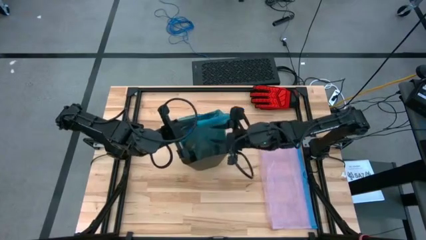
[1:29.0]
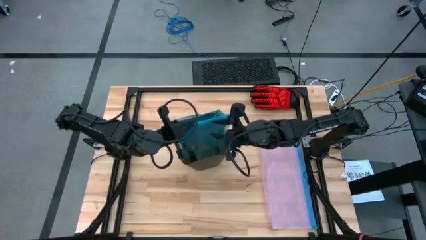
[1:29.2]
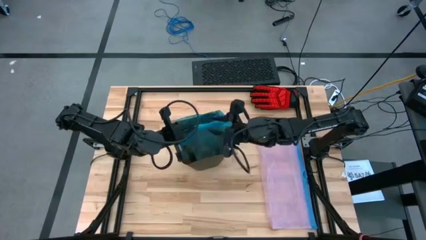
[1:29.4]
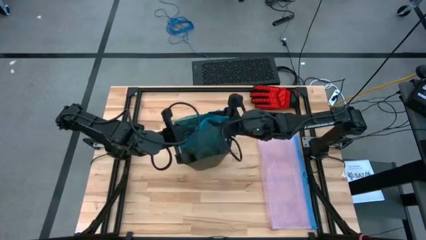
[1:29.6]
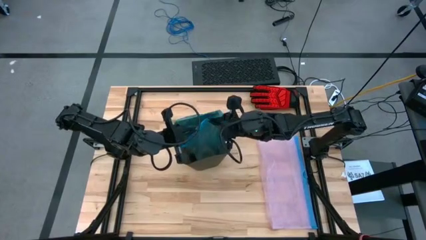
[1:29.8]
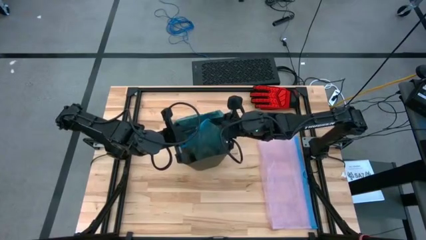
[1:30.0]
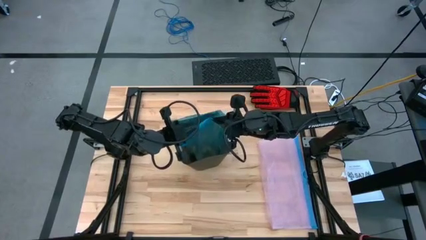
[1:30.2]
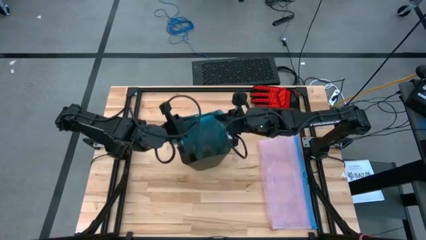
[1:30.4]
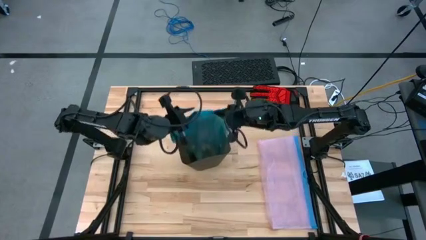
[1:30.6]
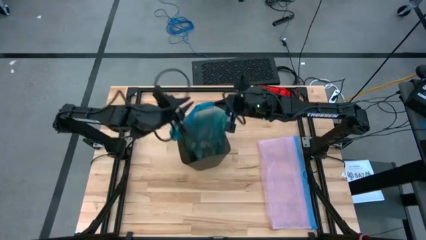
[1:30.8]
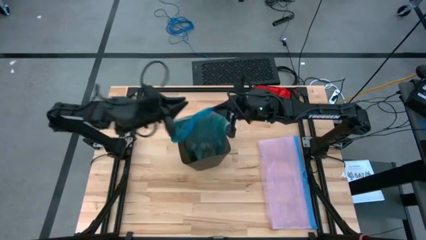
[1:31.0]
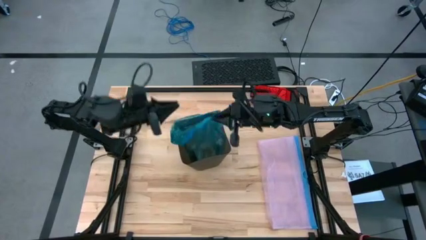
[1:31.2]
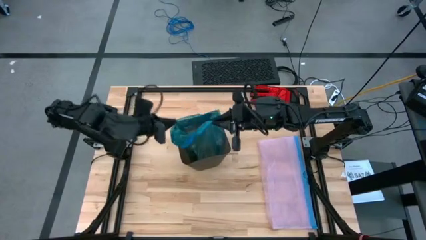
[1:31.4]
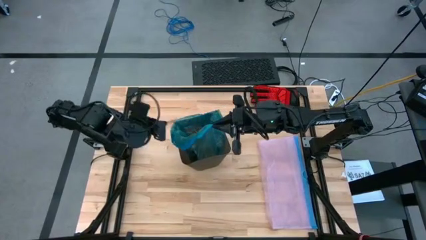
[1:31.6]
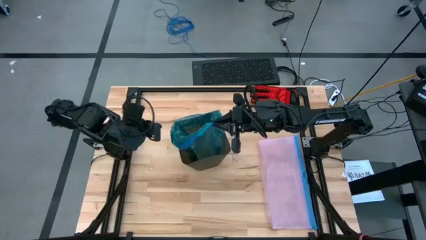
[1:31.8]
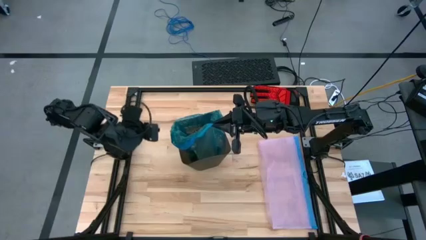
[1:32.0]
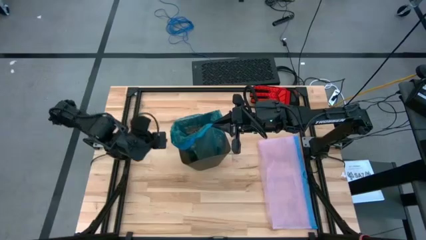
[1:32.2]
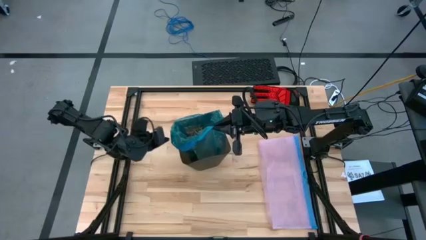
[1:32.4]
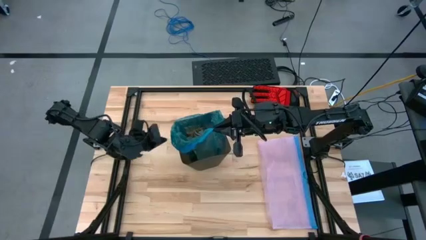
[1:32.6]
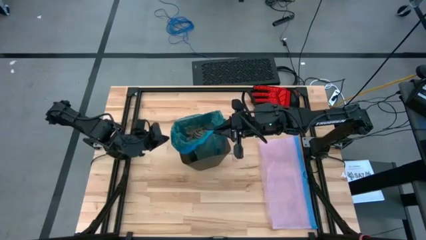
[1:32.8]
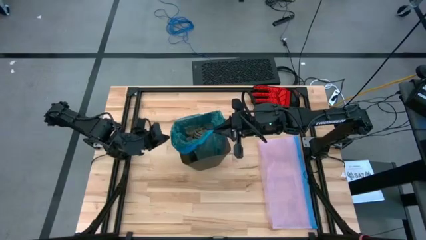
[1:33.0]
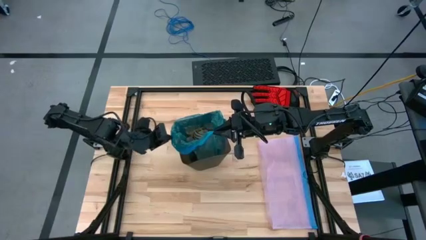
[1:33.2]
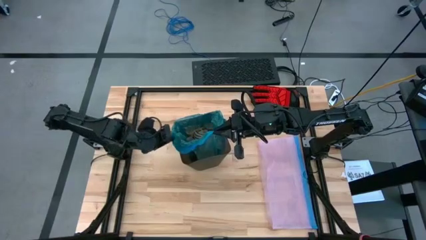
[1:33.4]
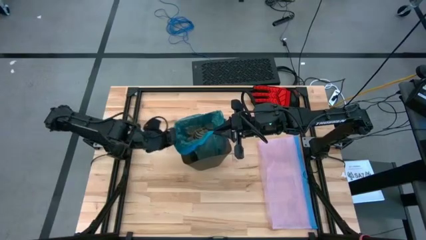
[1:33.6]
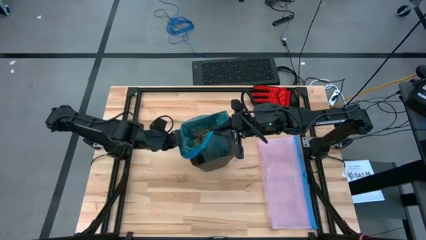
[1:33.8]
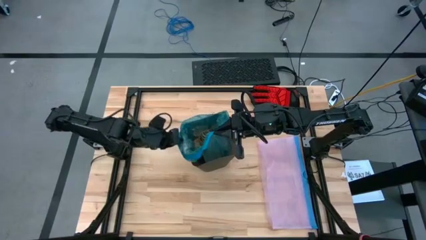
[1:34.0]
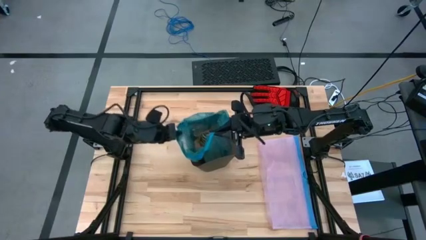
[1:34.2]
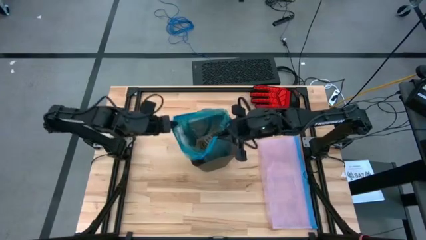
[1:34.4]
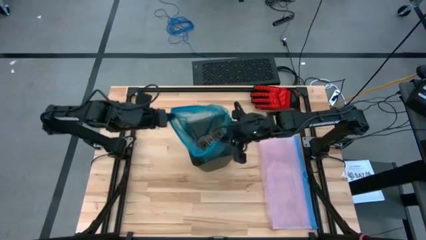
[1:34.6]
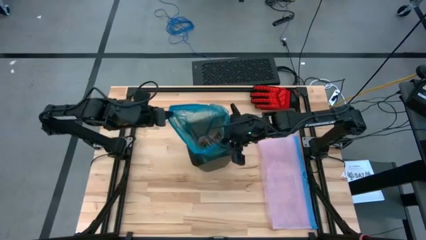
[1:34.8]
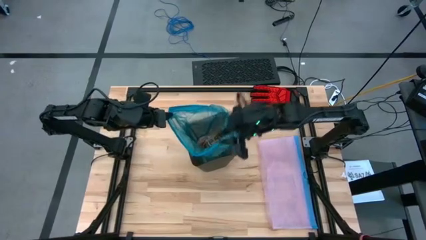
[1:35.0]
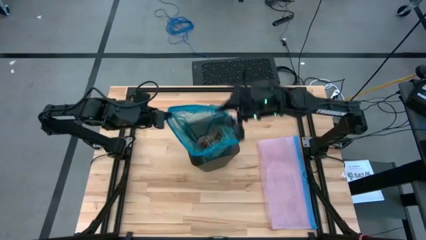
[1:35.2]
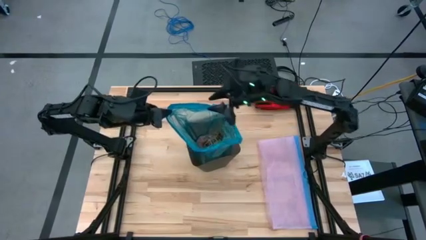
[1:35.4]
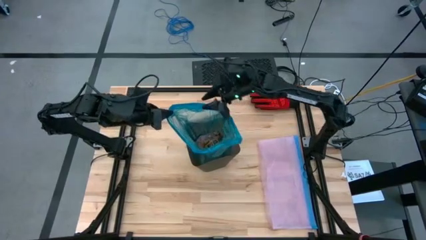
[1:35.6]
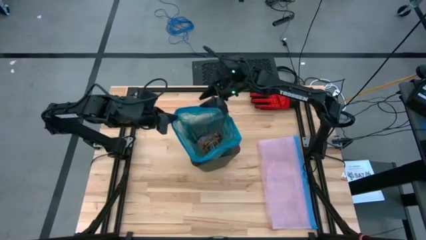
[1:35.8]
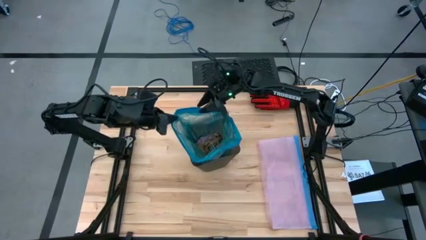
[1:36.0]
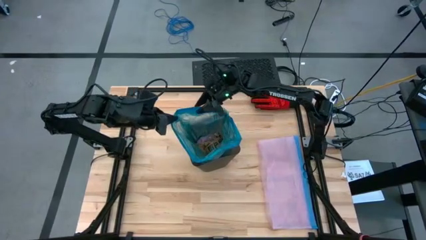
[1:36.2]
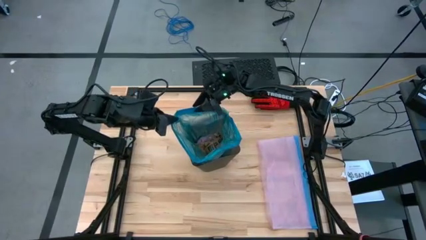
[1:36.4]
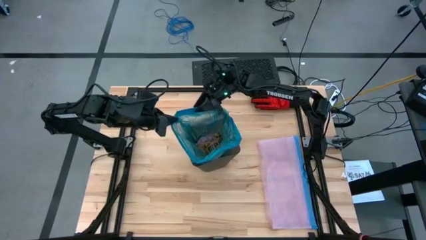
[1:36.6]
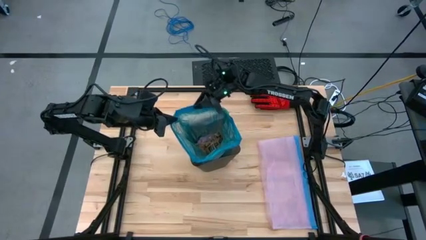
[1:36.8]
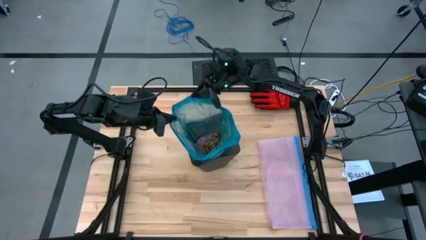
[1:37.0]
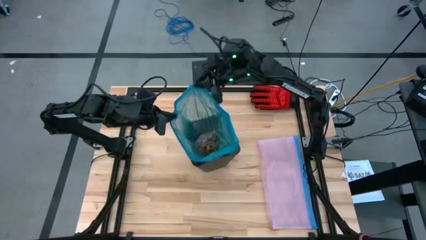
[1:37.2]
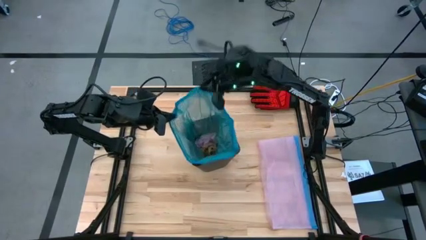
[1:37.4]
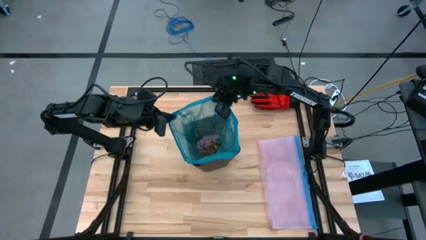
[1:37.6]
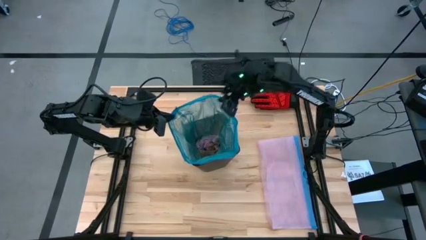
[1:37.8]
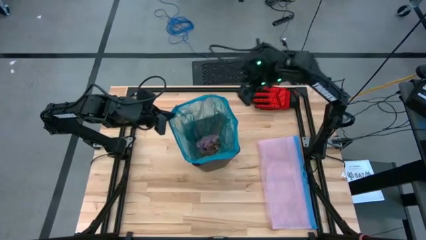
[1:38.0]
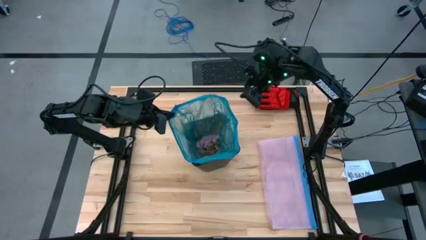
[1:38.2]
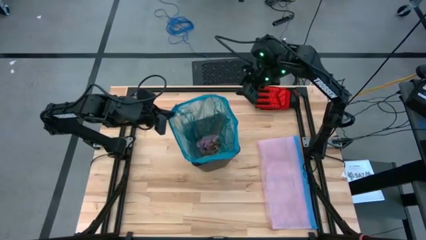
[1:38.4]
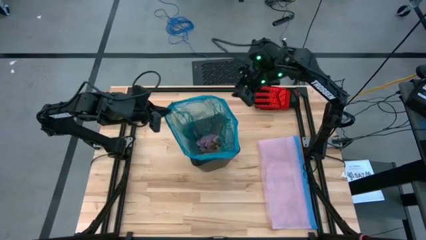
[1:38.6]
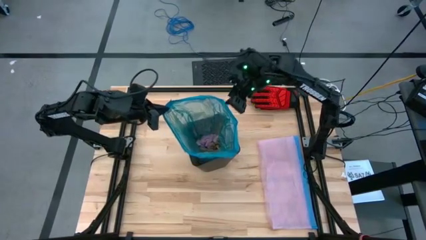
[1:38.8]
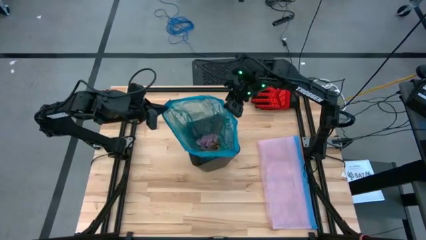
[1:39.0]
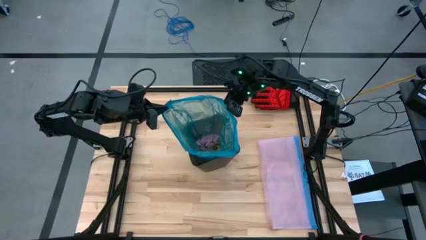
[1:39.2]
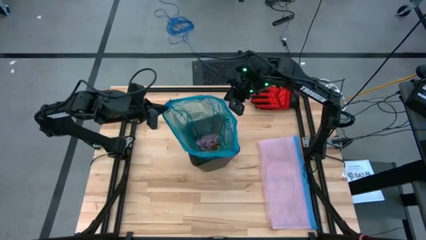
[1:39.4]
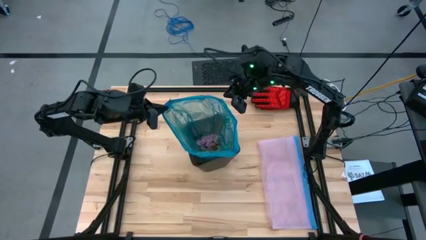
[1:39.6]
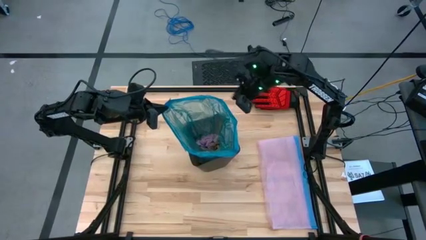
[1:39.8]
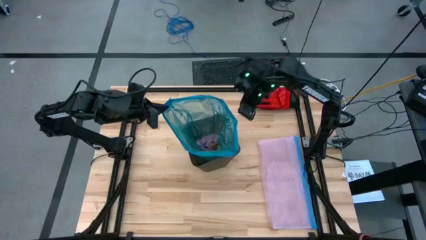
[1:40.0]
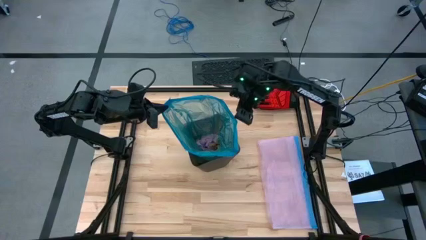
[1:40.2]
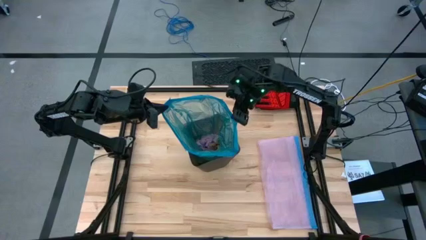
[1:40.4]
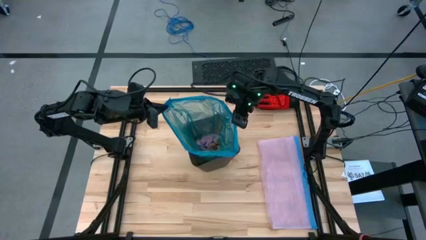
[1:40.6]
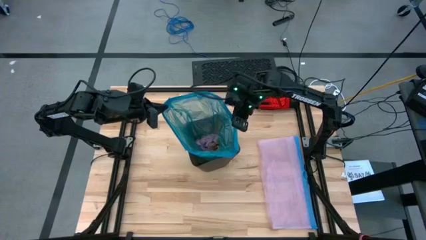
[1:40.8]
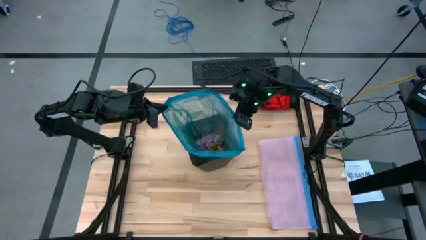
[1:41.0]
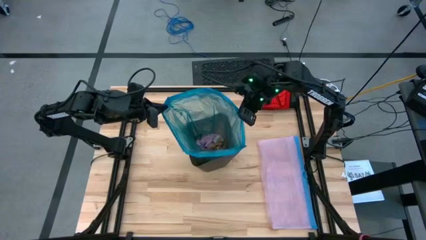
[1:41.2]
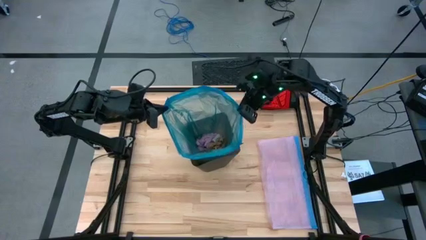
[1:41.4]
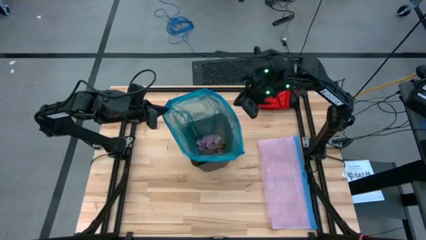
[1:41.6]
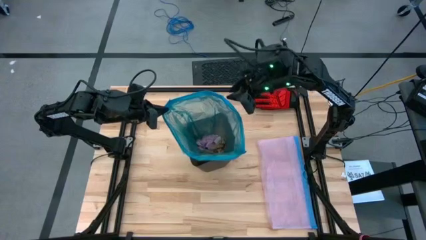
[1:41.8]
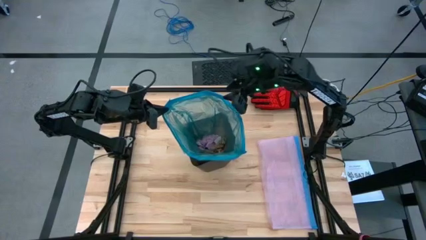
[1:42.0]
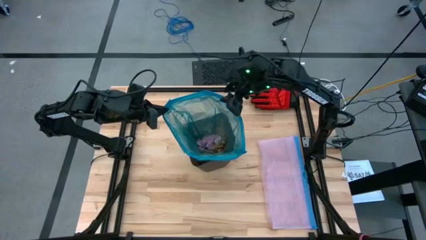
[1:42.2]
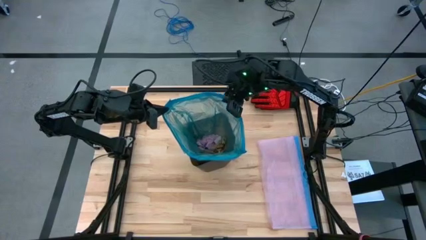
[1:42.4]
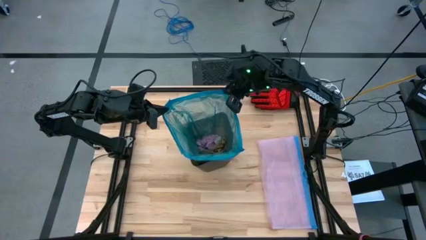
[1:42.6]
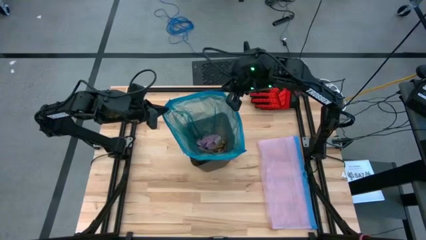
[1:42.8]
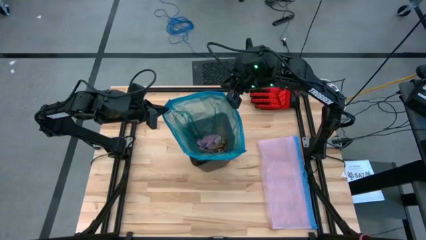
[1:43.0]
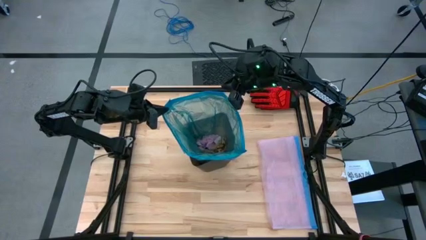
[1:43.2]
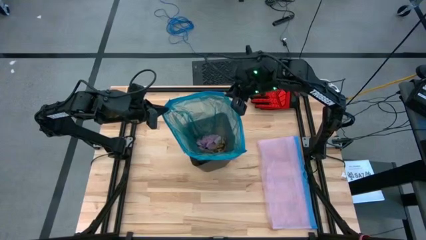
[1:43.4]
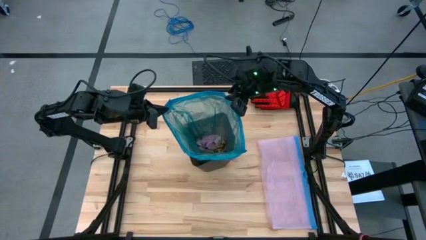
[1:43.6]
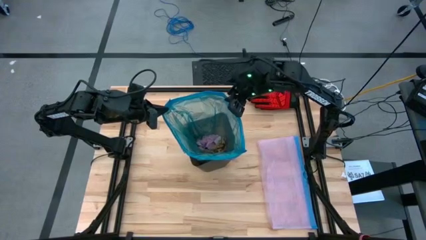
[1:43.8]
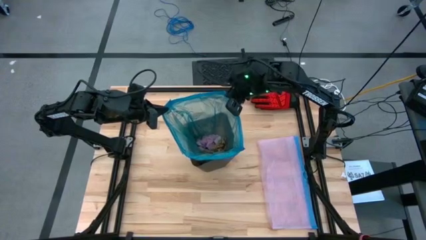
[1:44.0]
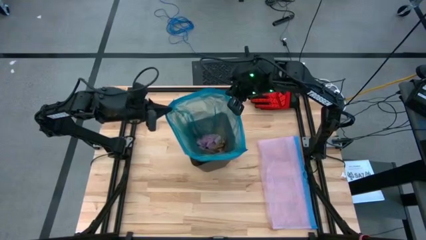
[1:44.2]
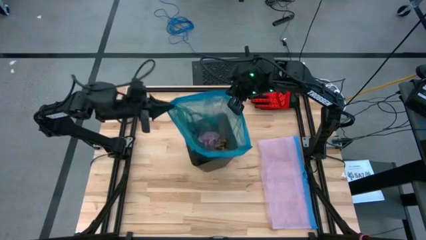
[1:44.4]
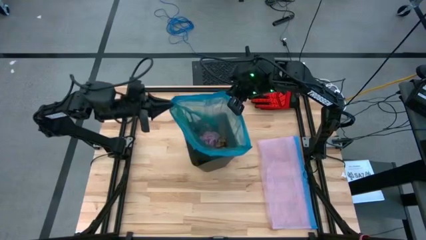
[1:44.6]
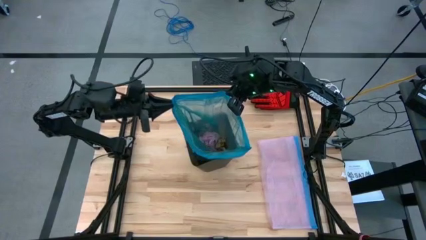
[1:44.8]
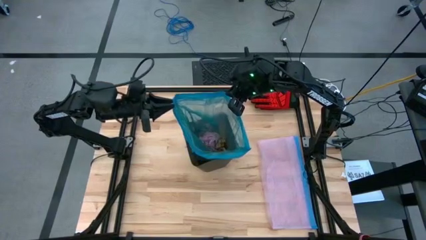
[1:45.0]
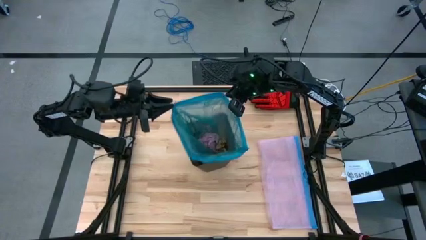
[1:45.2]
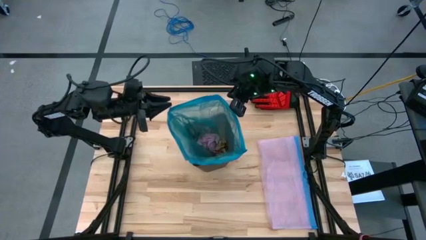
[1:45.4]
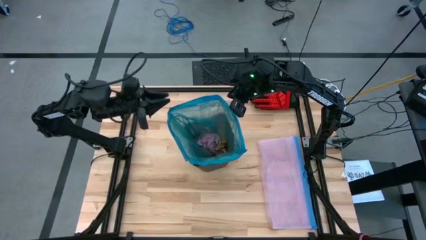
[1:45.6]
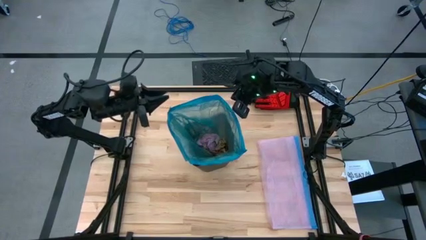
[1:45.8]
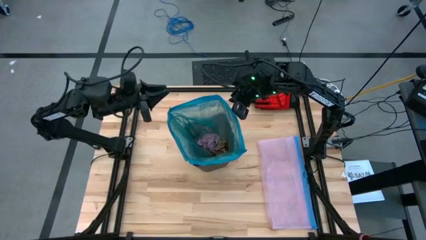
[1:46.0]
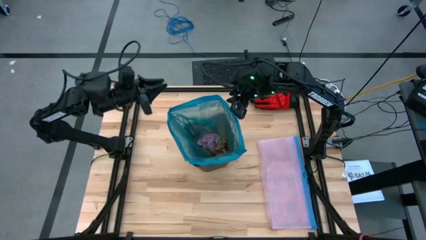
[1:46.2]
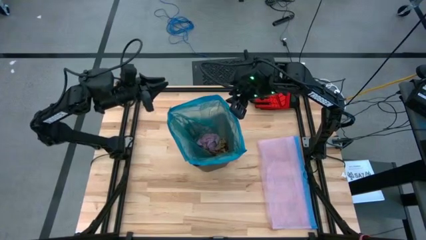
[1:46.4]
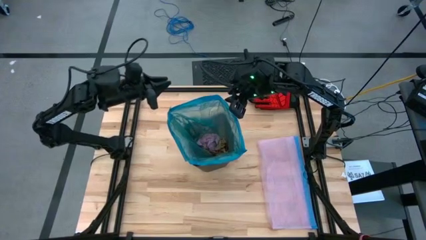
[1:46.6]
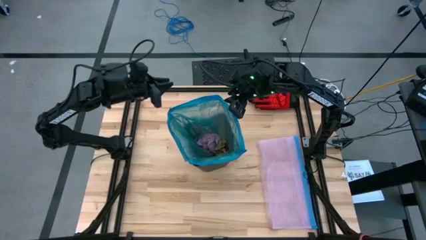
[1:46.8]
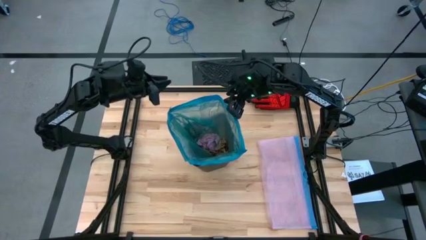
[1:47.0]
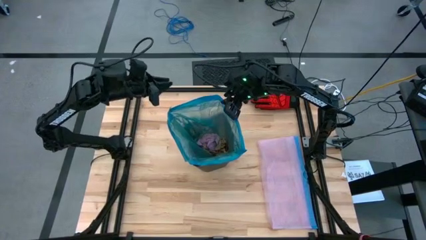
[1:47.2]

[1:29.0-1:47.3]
Task: place trash/remove bag and relplace
Remove the blue trash bag from the black trash bin
